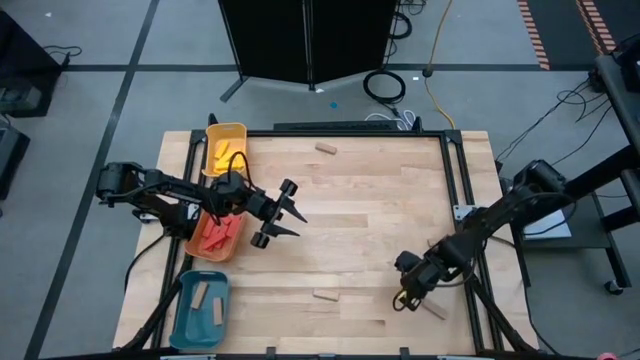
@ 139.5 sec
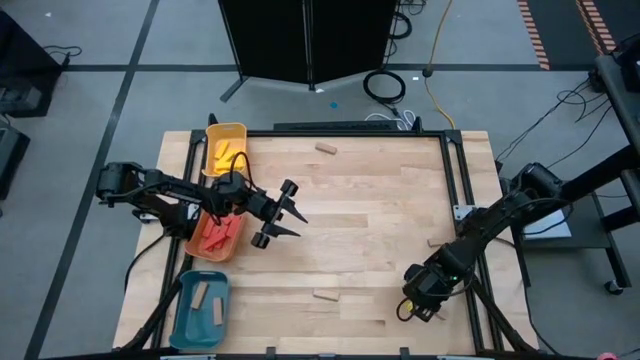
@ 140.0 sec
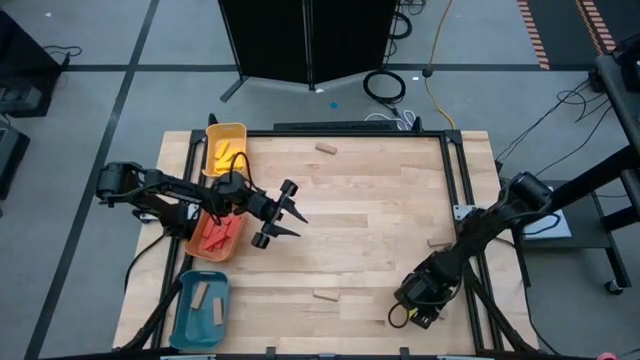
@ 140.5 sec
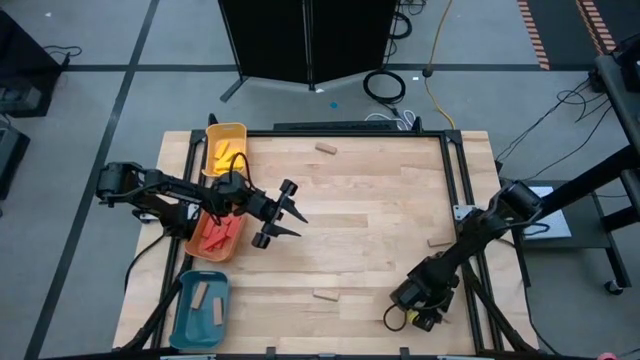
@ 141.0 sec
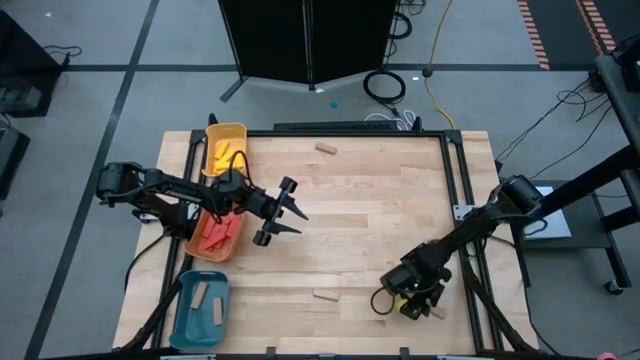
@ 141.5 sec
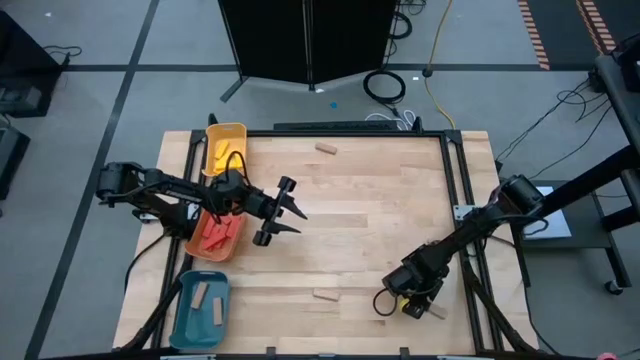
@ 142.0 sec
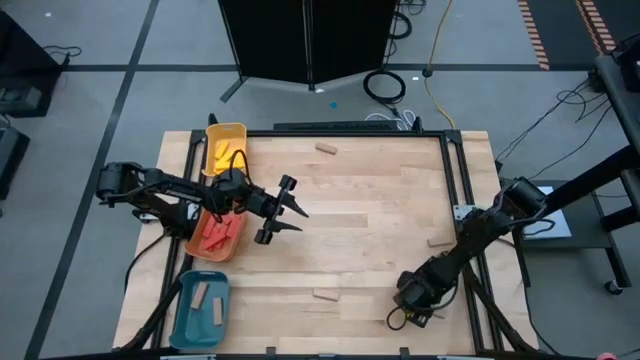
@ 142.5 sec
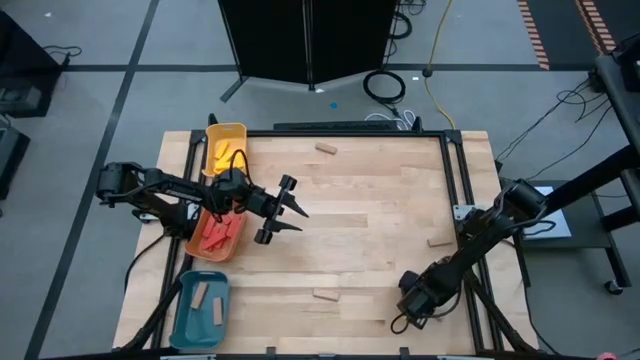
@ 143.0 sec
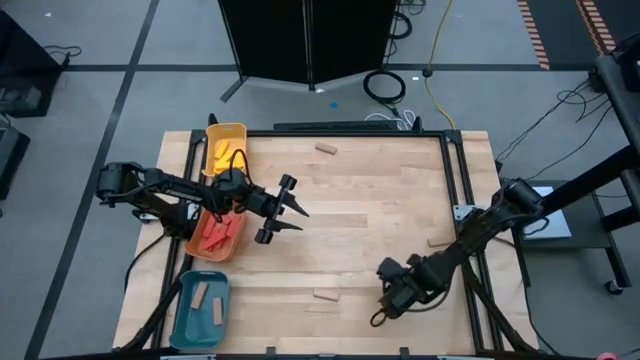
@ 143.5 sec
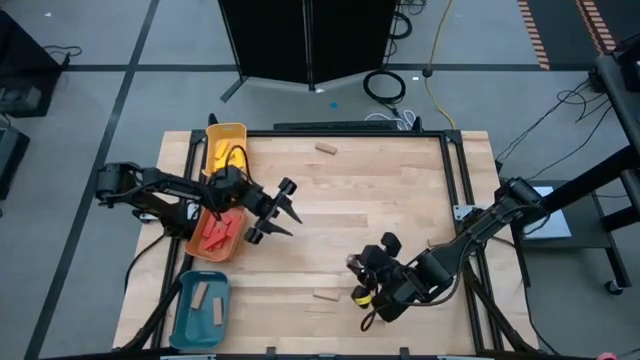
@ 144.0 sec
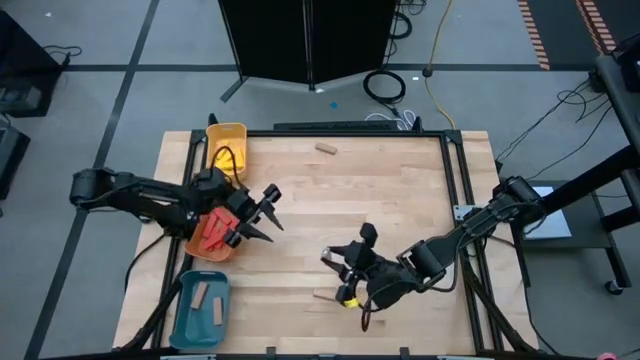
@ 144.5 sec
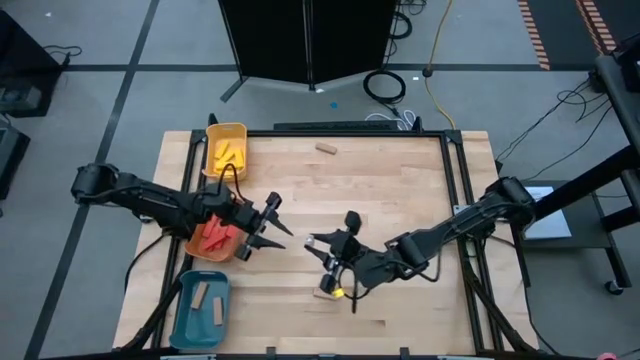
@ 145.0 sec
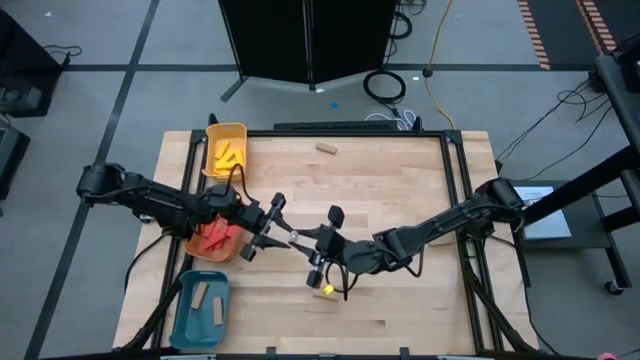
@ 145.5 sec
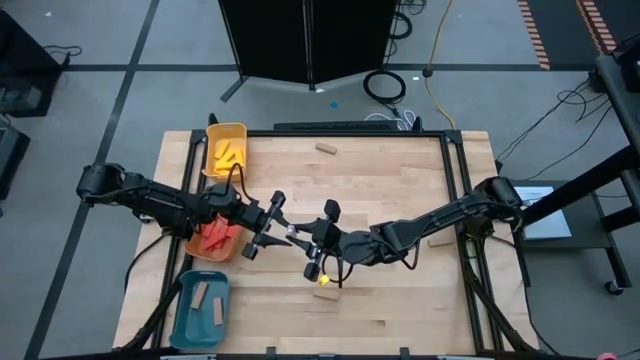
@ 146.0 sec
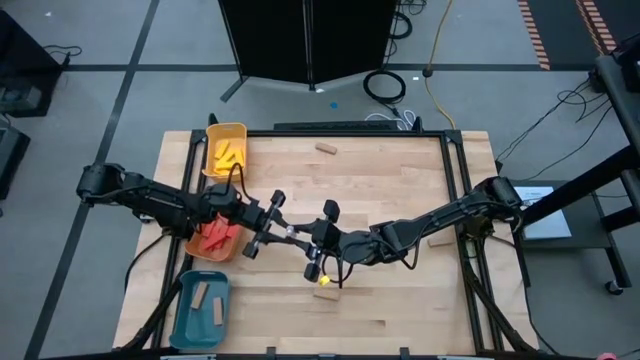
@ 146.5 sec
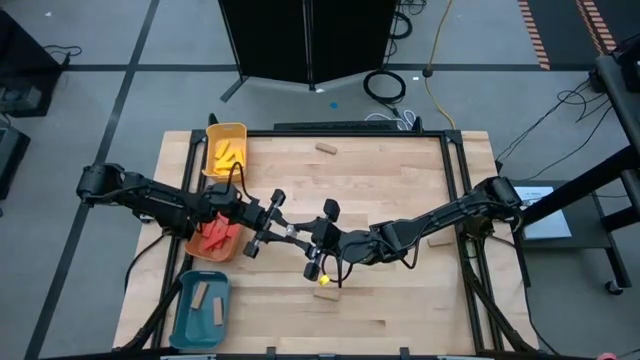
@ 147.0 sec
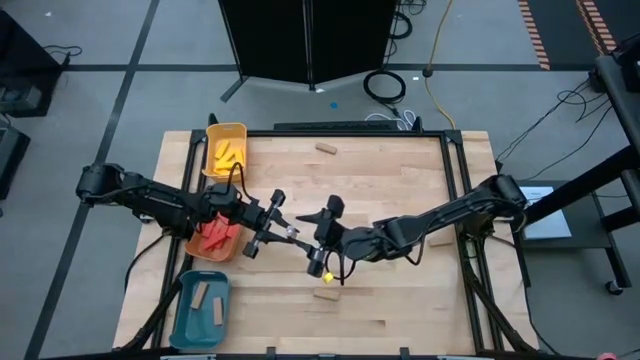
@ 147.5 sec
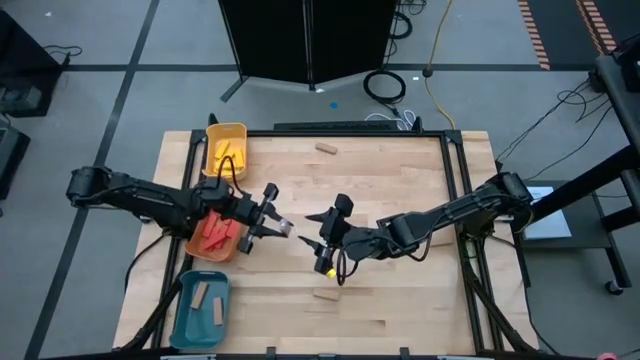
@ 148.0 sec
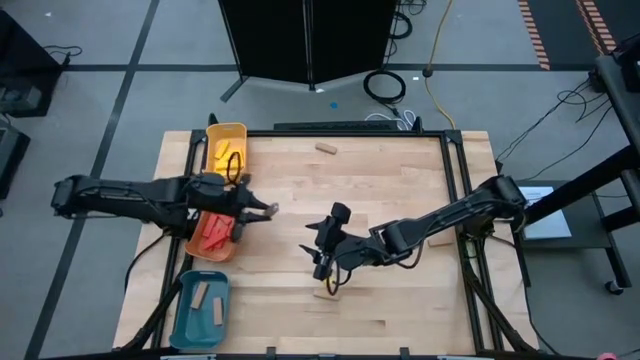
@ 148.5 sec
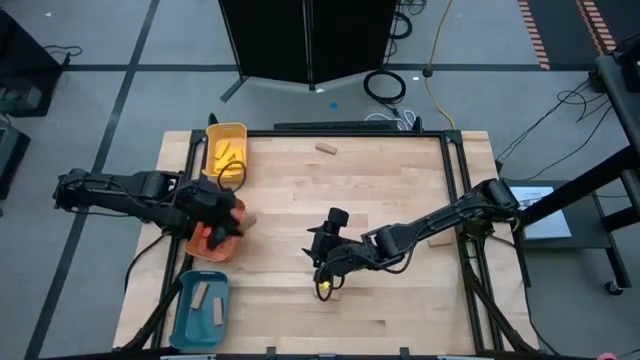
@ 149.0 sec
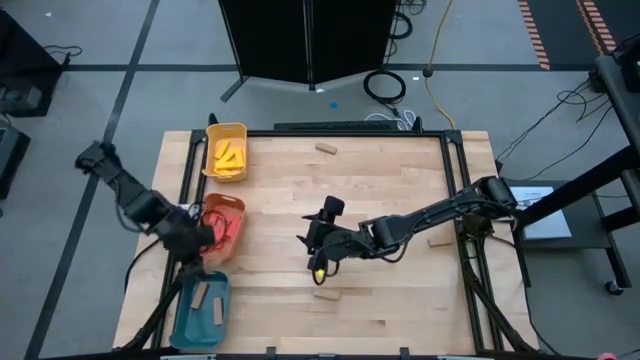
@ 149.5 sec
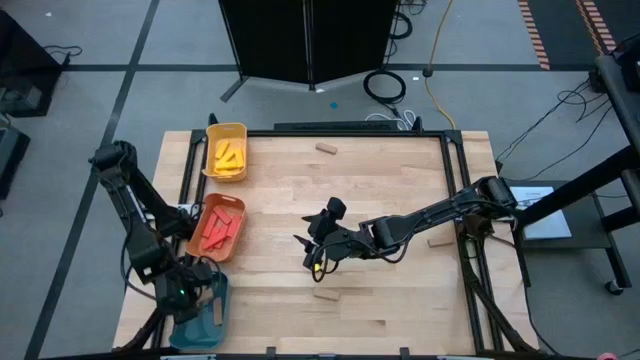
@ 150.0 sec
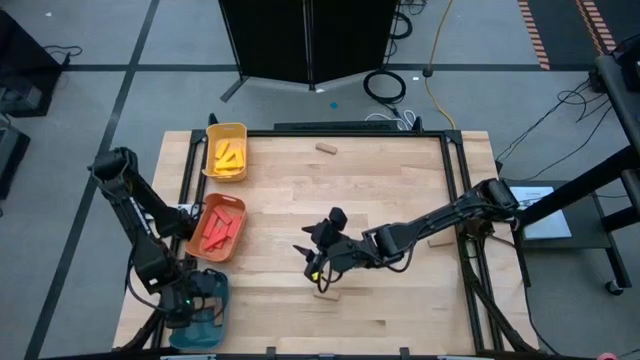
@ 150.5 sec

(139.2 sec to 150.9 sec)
Task: Sort blocks
Put the bottom right brown block in the blue bin

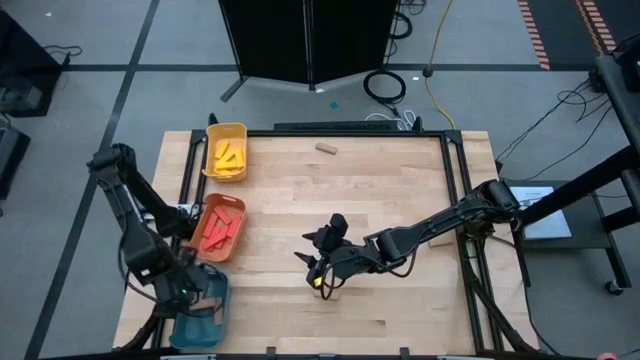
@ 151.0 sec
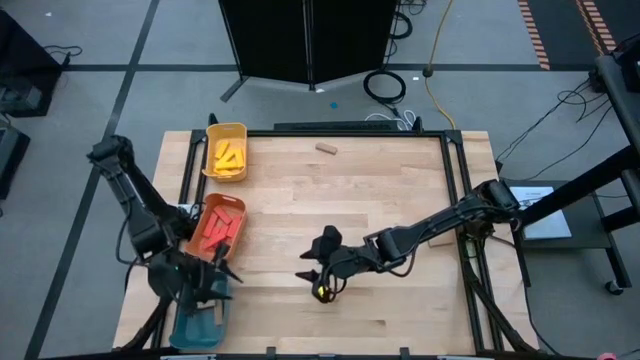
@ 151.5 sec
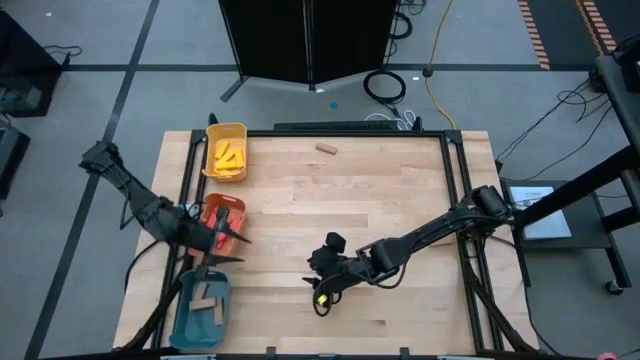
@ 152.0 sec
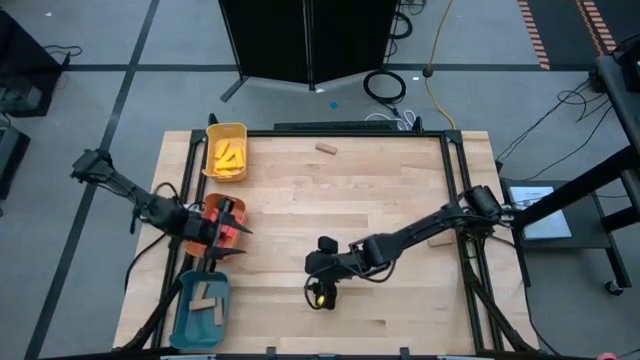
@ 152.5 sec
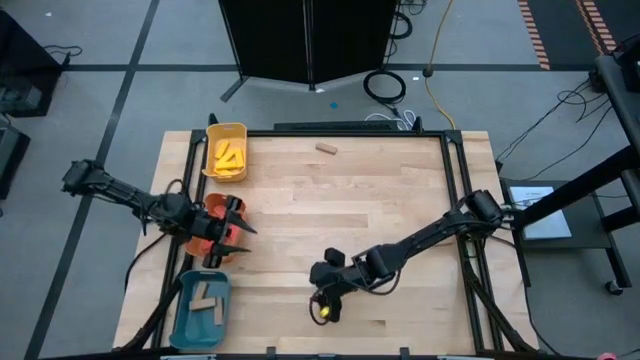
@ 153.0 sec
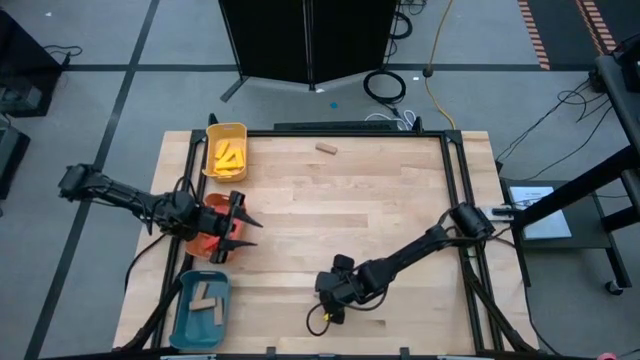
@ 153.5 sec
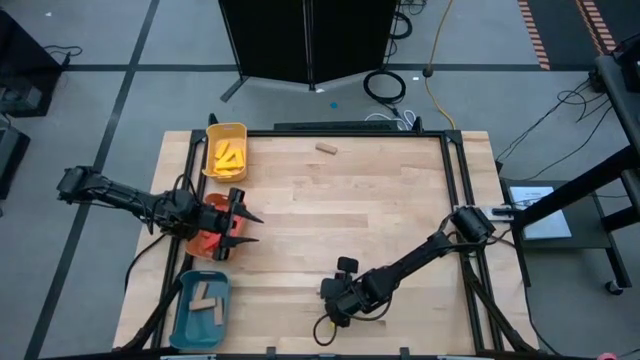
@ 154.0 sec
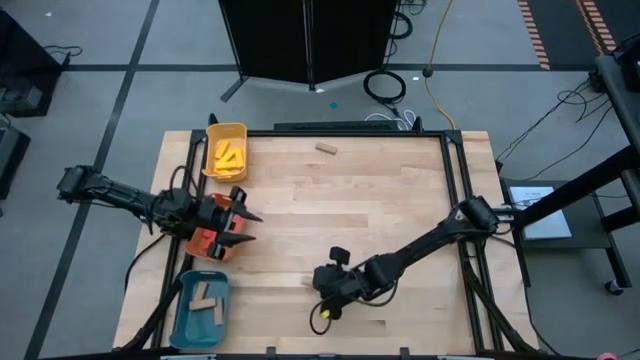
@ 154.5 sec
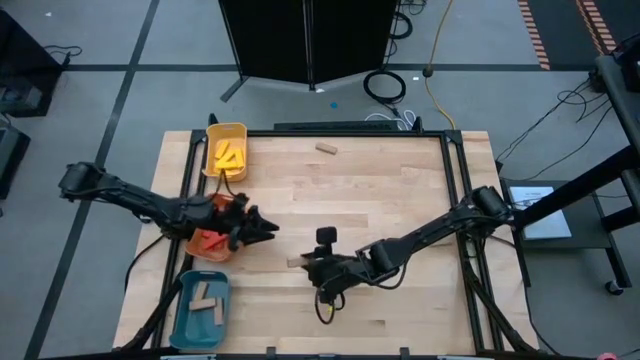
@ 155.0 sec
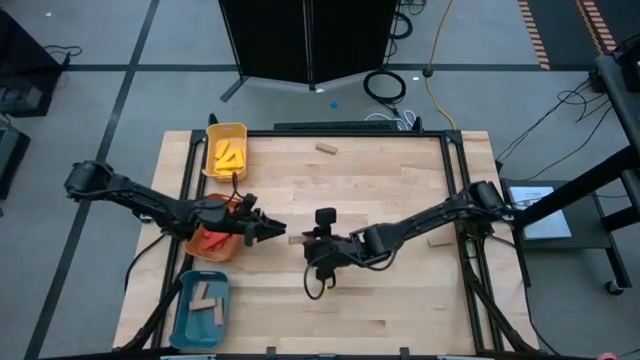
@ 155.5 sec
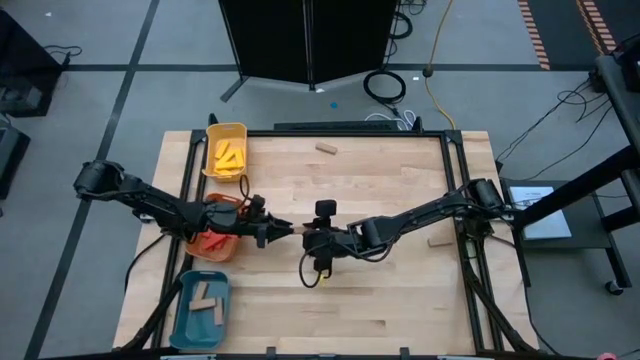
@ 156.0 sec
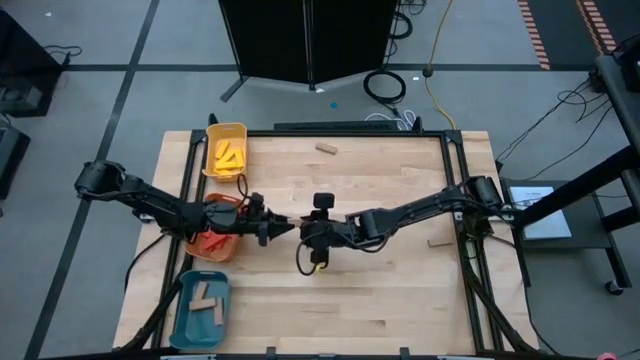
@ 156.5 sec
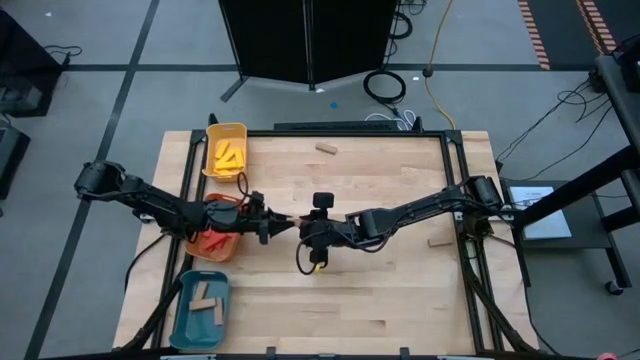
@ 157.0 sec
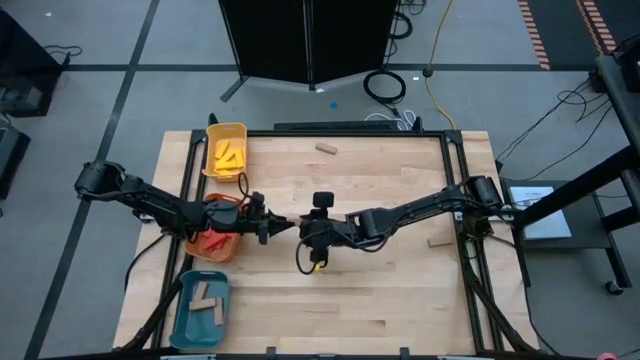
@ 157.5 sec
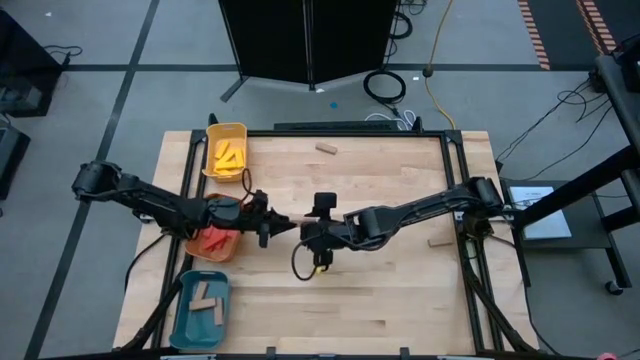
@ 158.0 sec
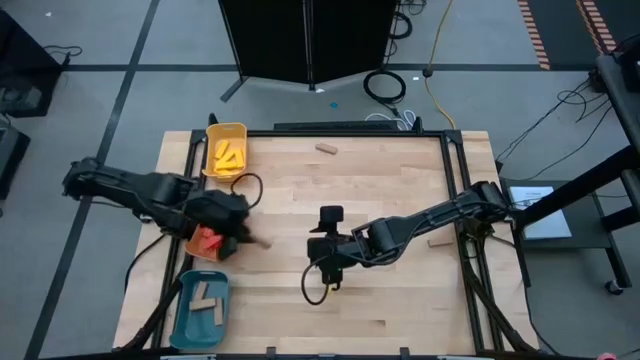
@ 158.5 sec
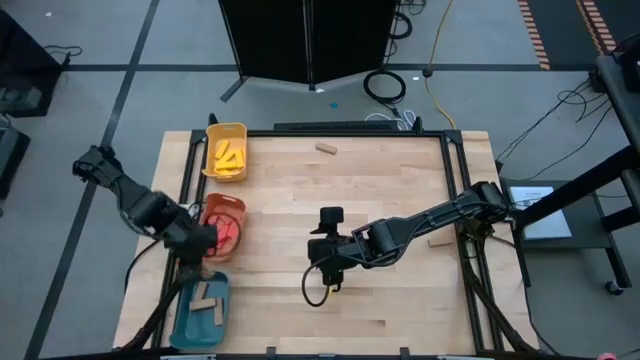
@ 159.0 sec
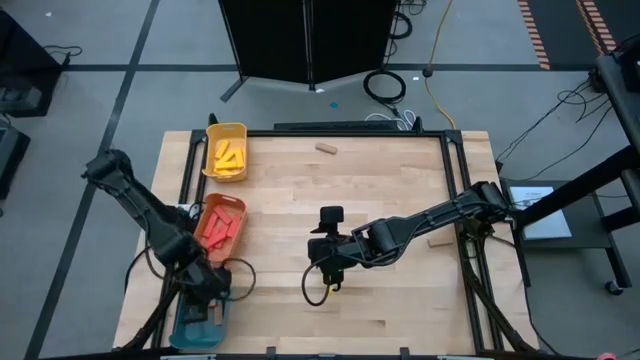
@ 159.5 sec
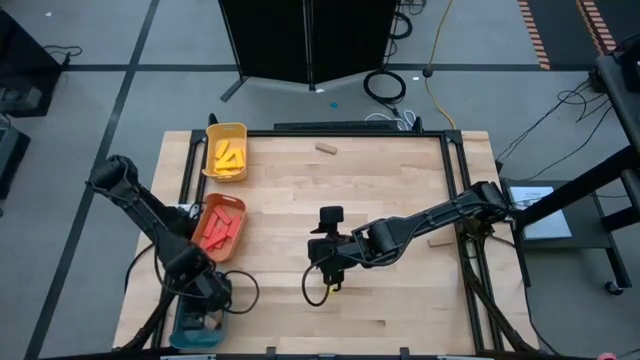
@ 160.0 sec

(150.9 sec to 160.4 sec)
Put the bottom left brown block in the blue bin
